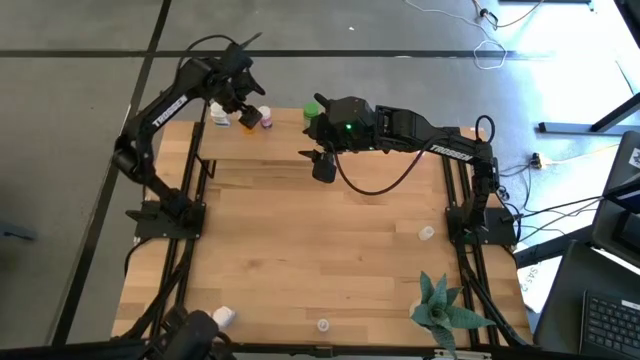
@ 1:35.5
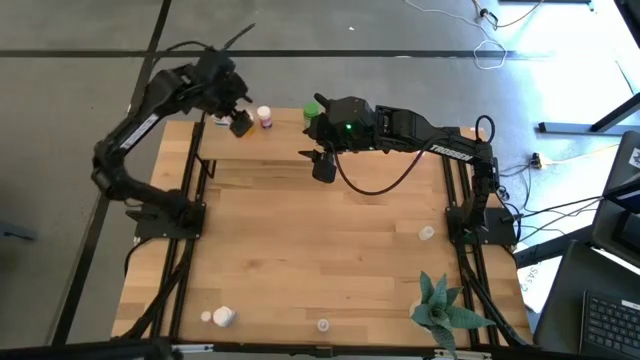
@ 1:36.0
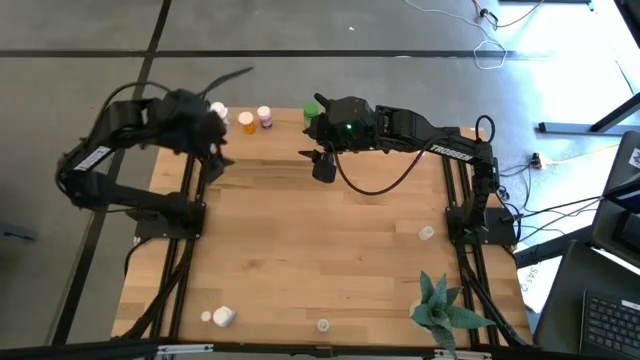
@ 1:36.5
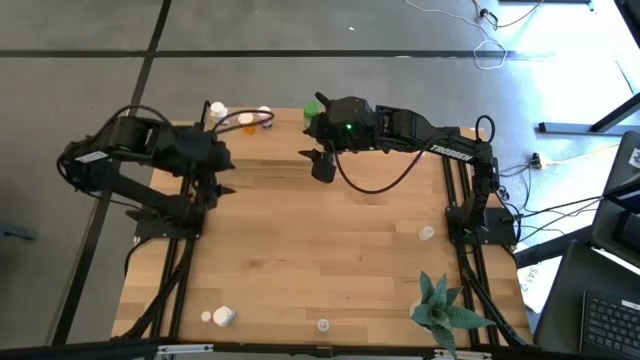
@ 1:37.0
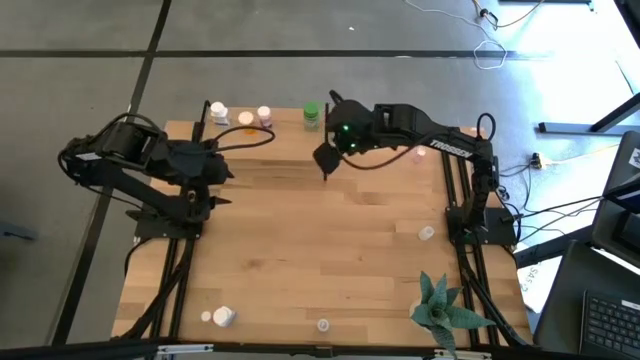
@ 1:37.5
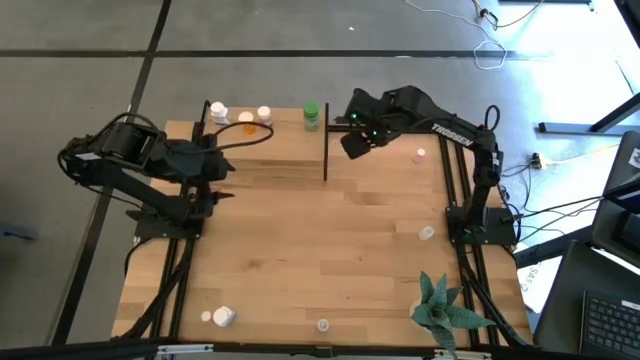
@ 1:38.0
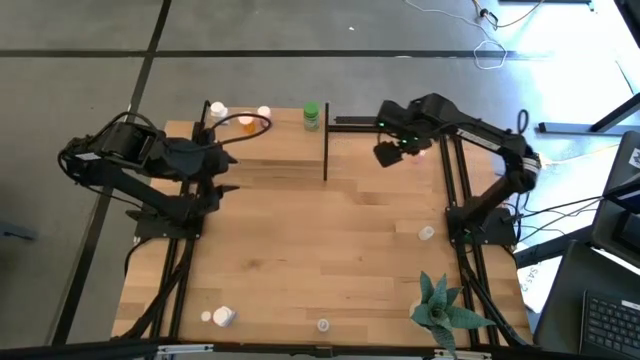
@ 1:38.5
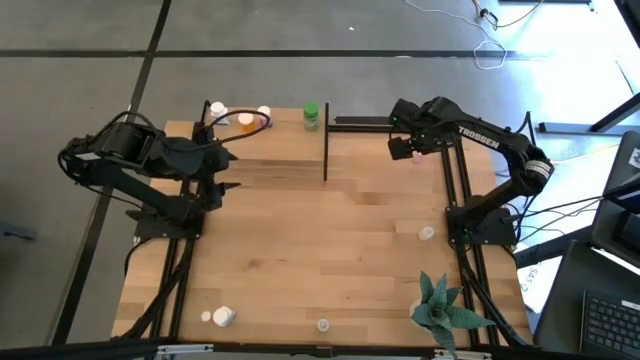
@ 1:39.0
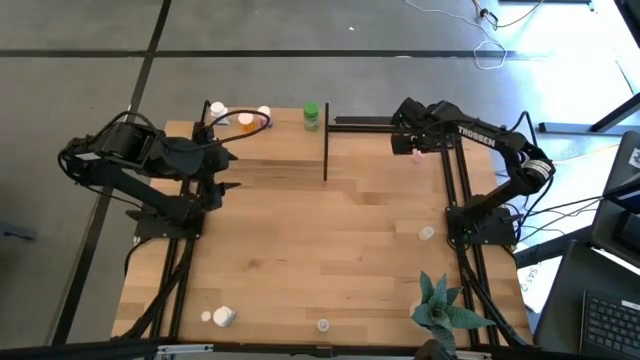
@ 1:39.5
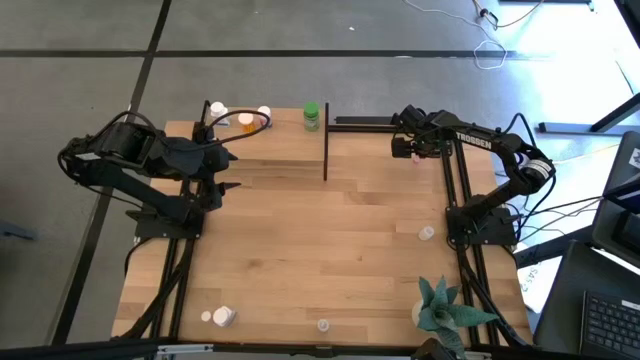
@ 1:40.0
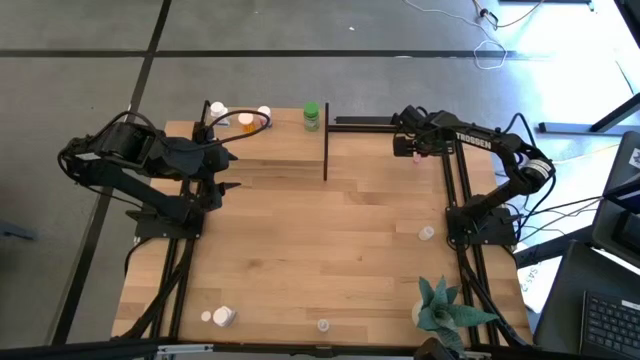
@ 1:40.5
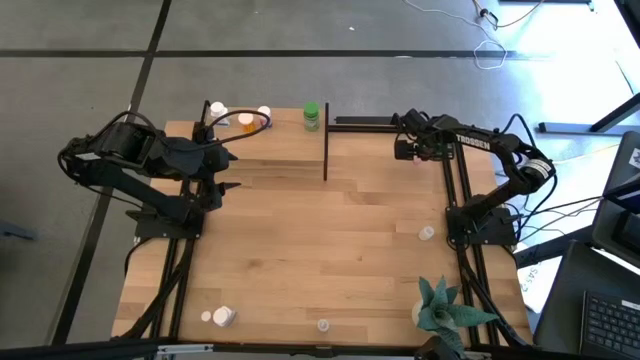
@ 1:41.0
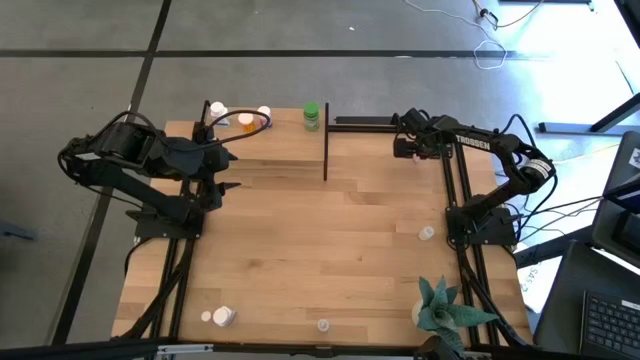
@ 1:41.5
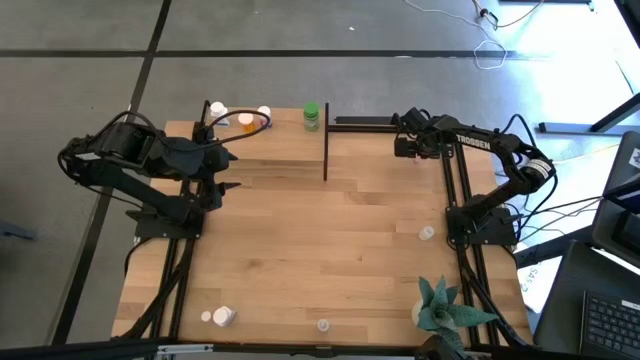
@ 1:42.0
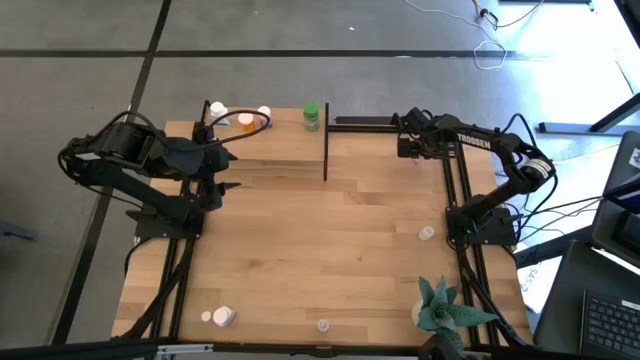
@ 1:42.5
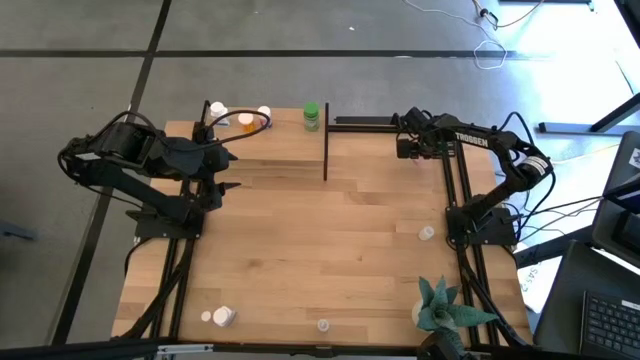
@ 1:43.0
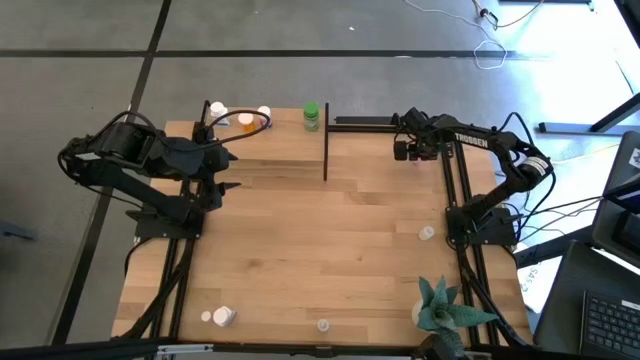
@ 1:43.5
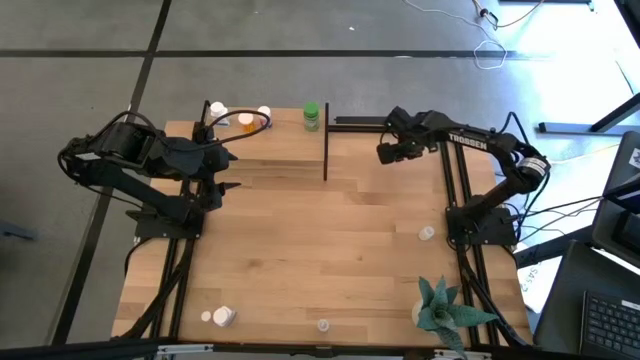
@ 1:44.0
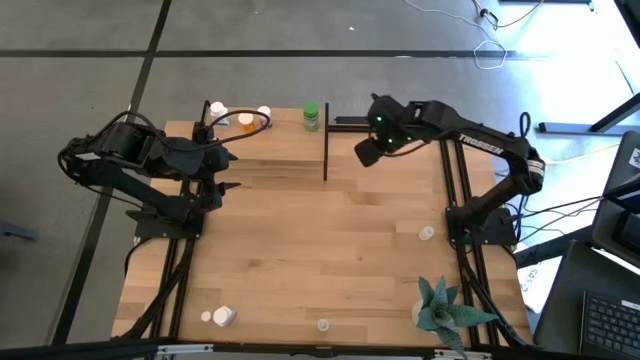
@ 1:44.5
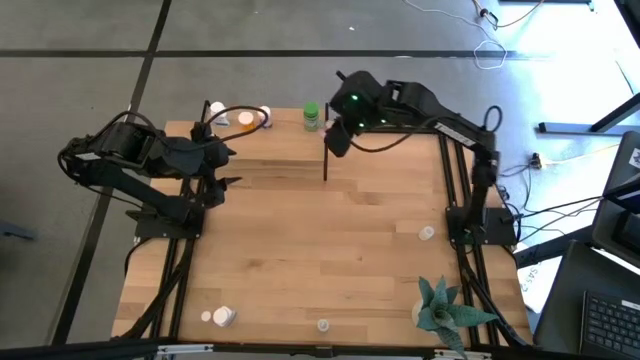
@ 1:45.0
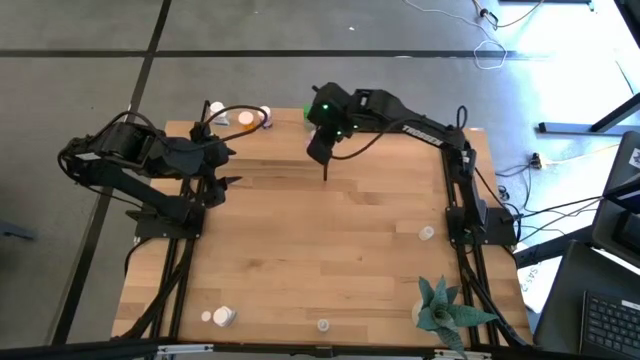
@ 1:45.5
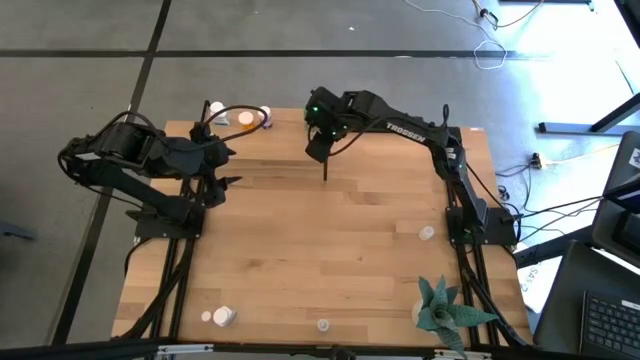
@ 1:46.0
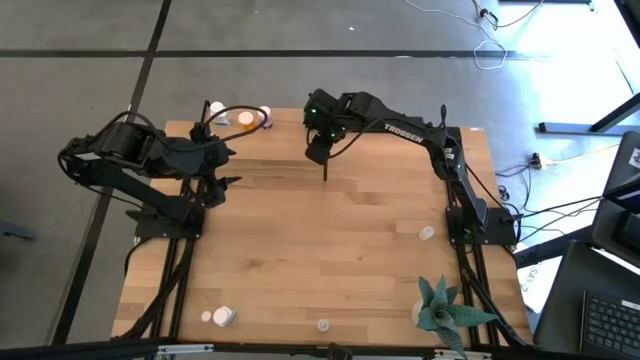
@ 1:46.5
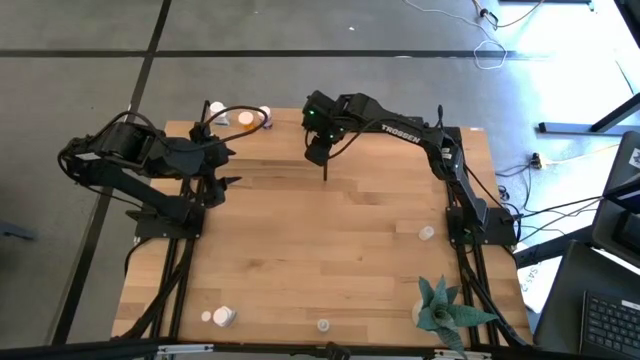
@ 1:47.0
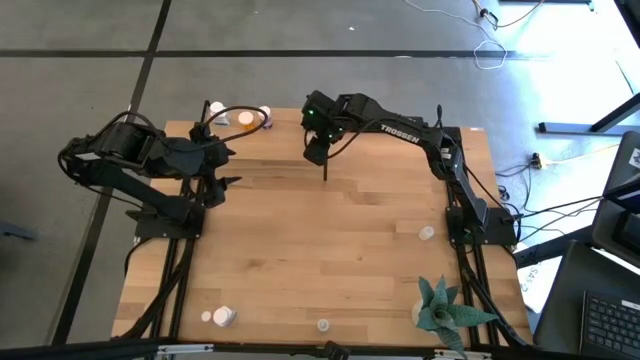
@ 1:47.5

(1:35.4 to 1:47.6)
Task: Pick and place medicine bottles onto shelf by color
Put the purple pill bottle on the shelf

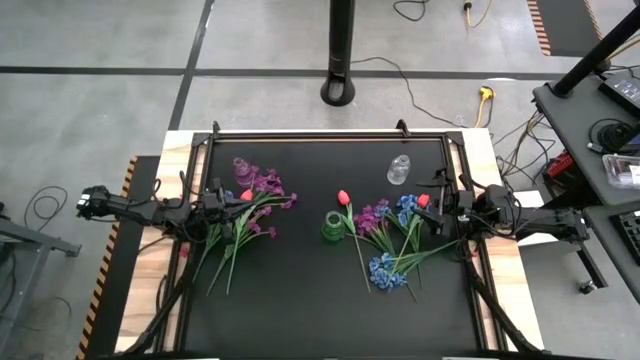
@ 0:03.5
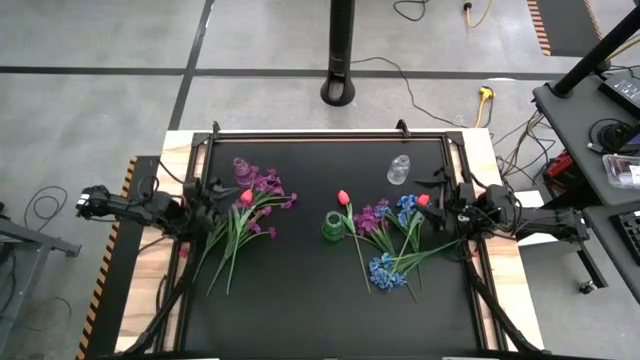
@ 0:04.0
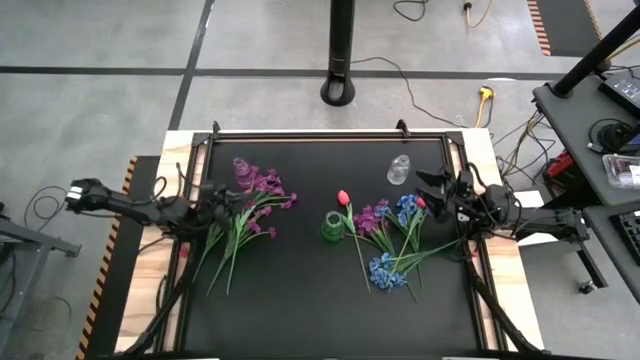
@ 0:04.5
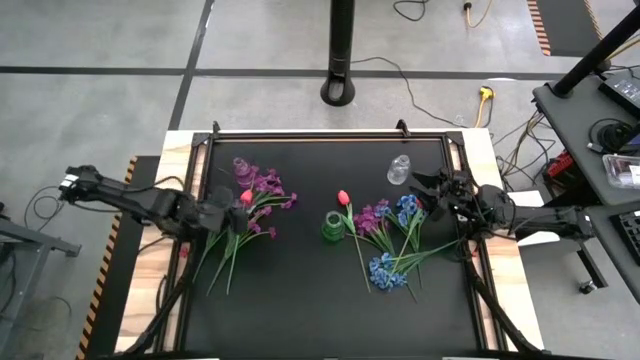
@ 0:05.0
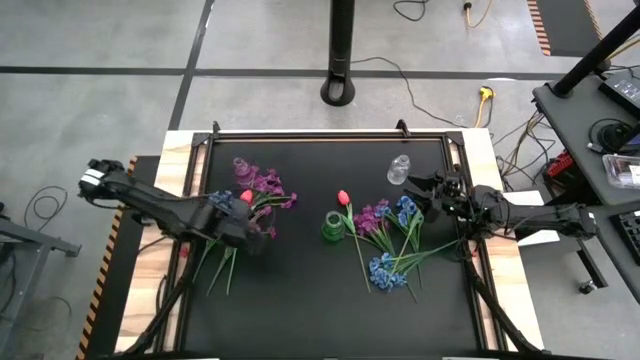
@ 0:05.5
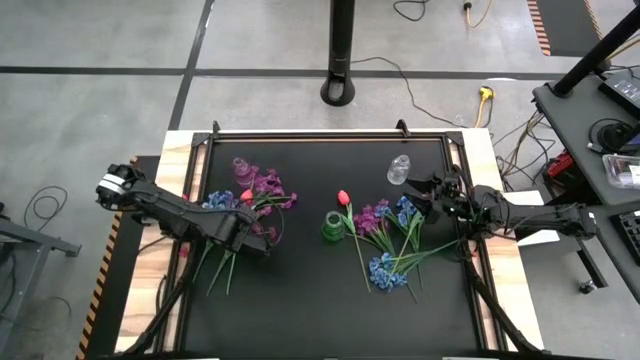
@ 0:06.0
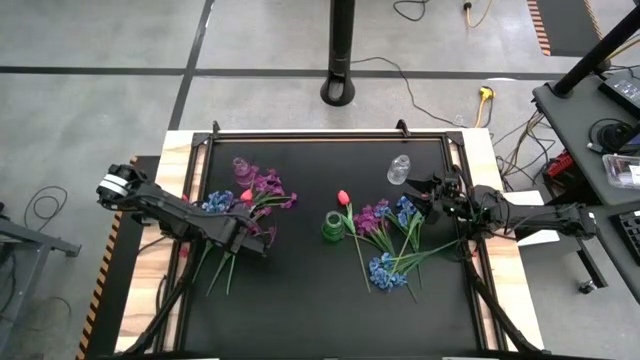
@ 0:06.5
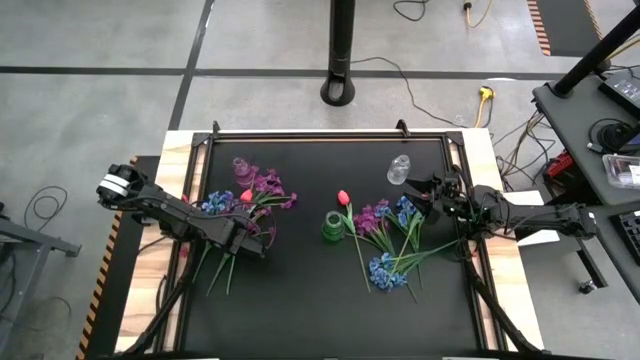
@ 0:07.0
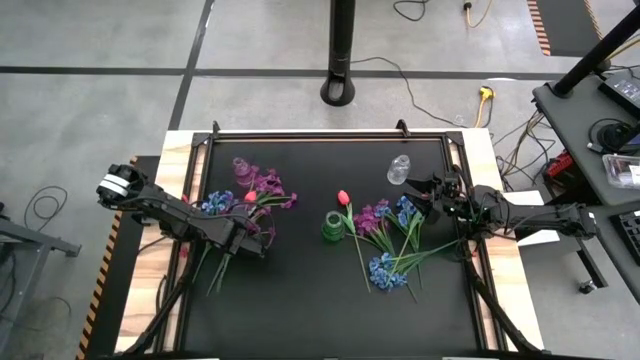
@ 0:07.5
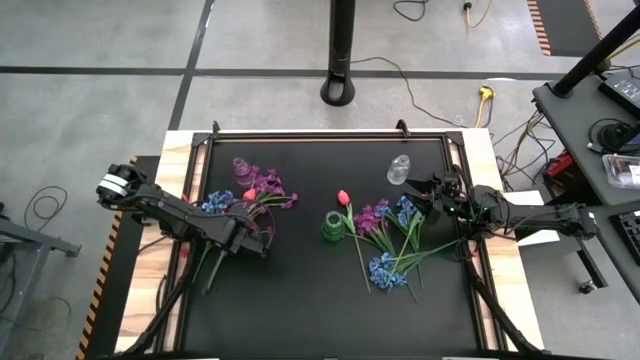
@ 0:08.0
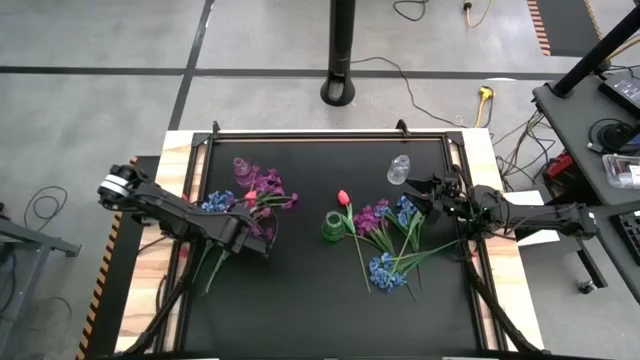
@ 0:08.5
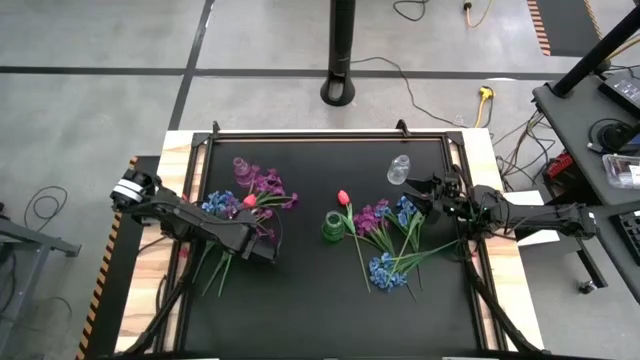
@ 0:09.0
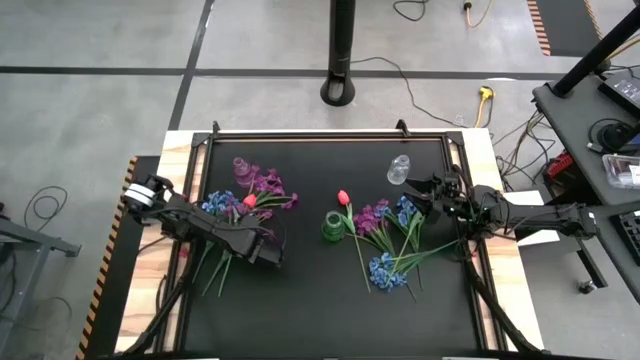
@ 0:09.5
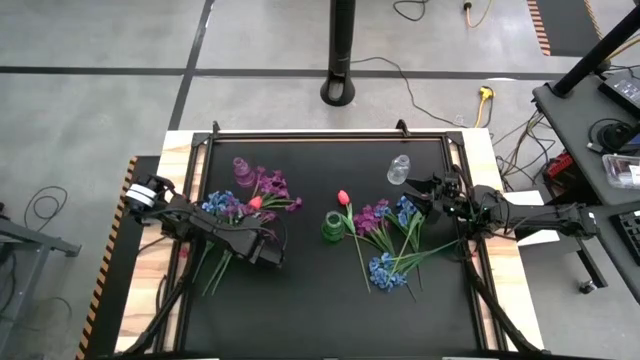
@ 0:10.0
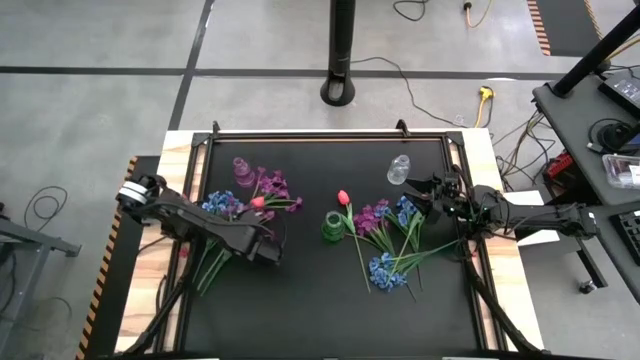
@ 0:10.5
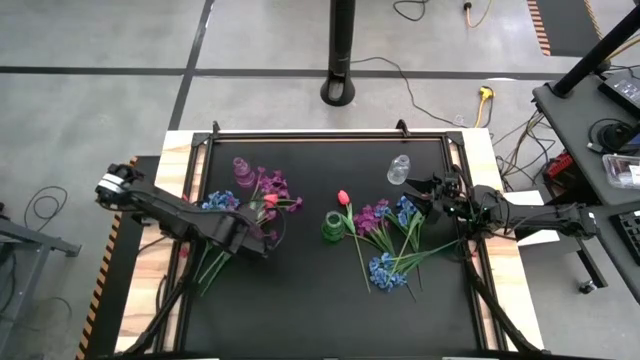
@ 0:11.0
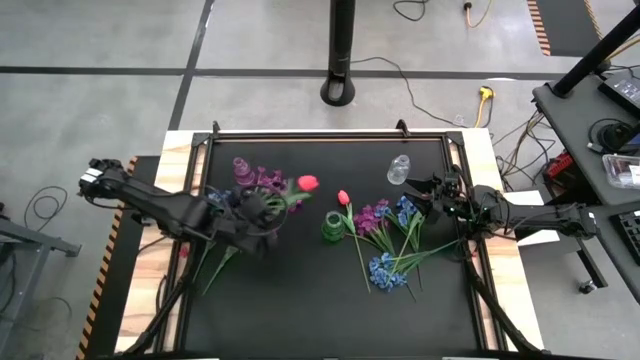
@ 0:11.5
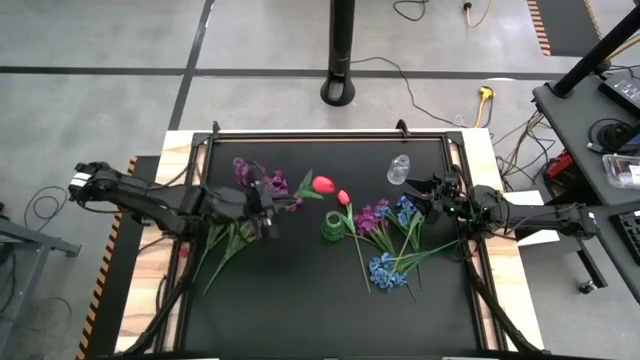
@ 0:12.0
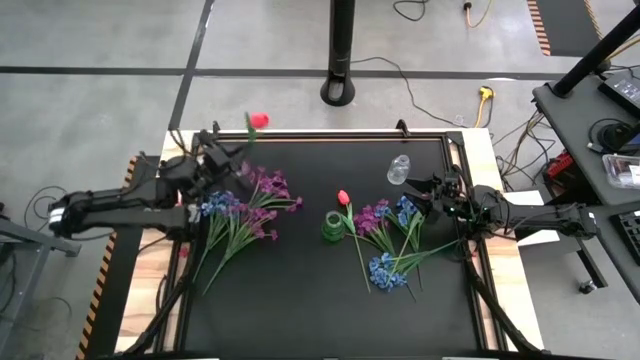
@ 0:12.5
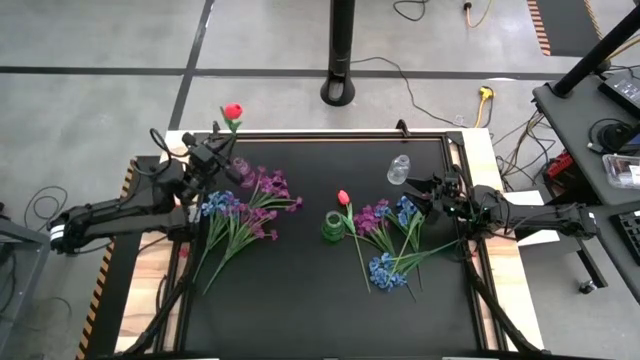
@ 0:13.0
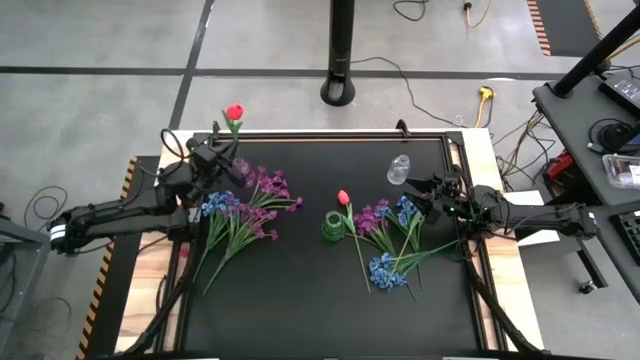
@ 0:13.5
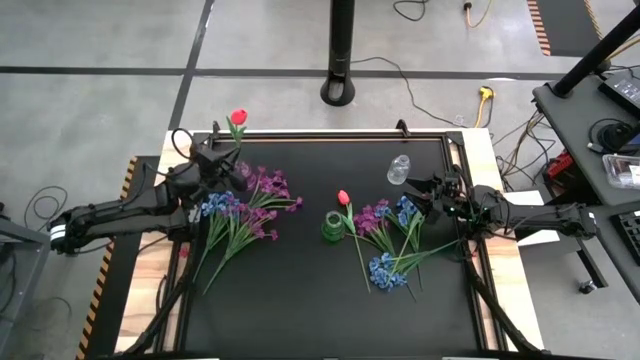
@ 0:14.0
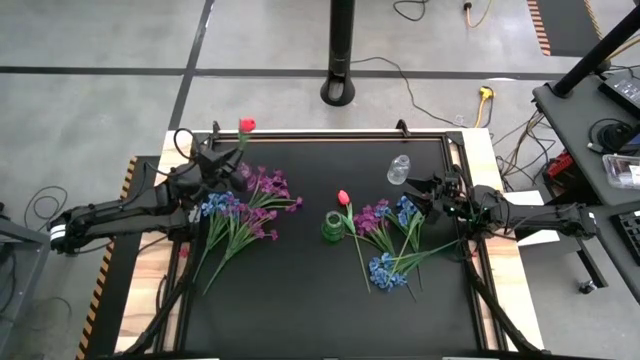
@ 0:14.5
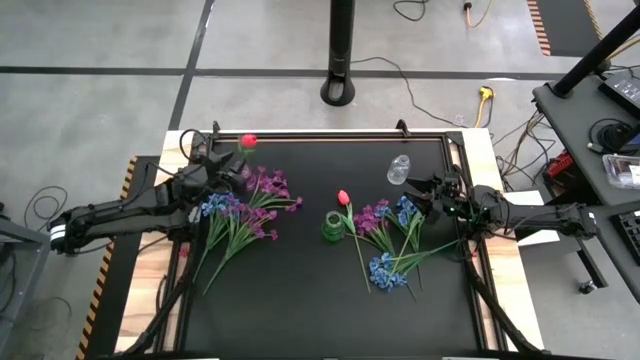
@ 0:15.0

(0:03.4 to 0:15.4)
Task: Sort flowers into vase by color
Put the middle left pink tulip into the violet vase
